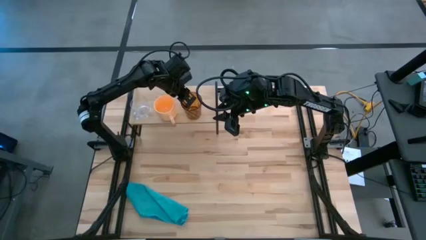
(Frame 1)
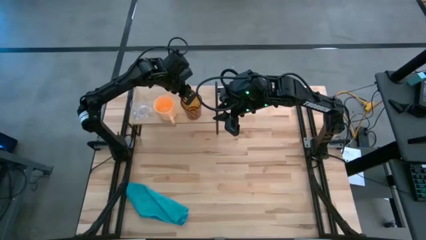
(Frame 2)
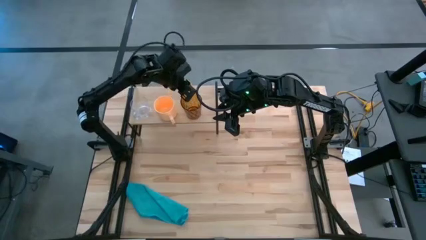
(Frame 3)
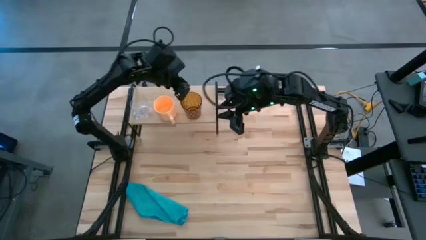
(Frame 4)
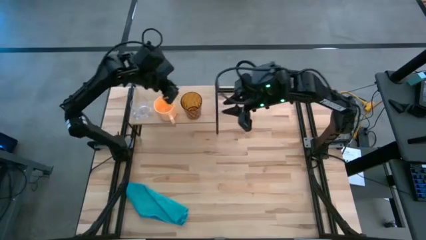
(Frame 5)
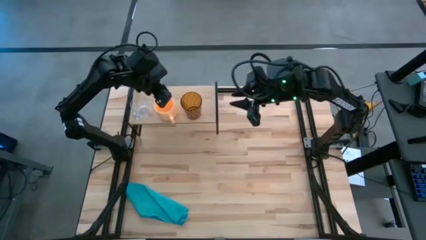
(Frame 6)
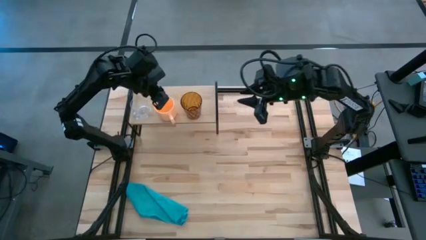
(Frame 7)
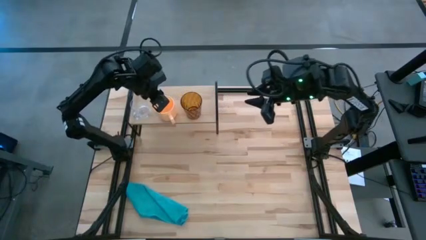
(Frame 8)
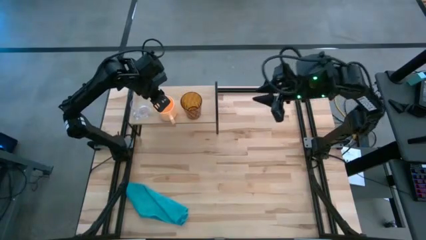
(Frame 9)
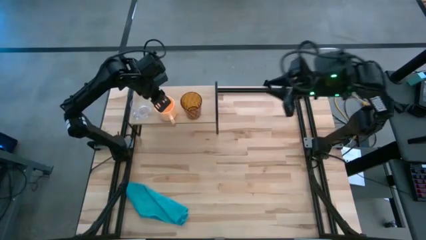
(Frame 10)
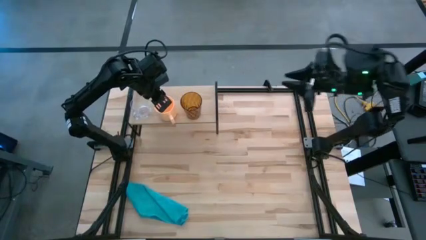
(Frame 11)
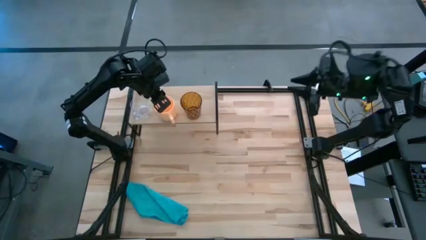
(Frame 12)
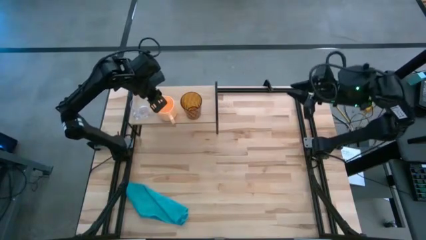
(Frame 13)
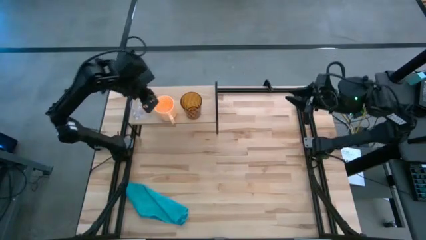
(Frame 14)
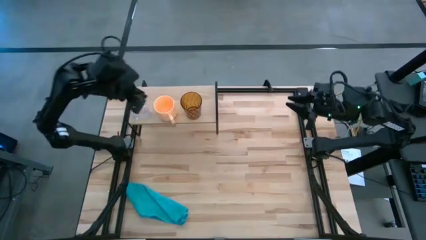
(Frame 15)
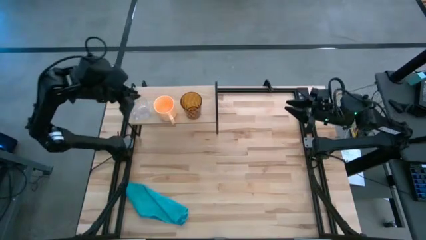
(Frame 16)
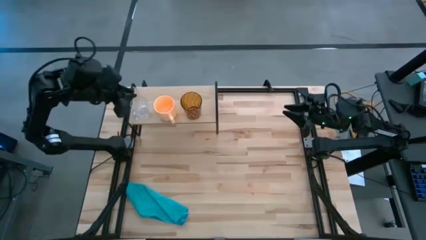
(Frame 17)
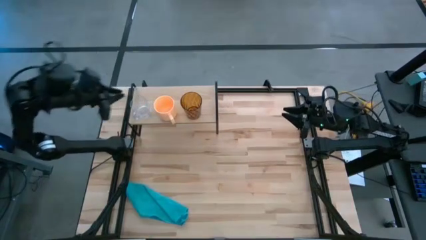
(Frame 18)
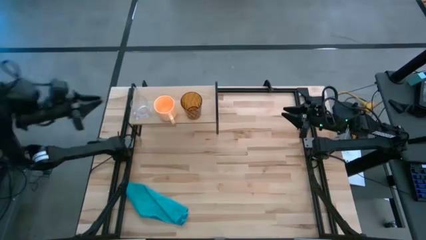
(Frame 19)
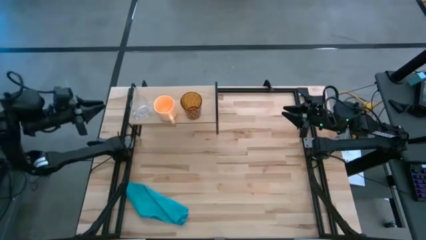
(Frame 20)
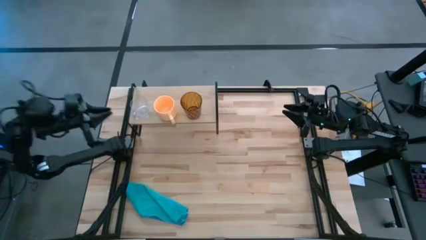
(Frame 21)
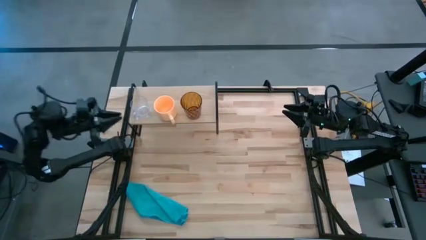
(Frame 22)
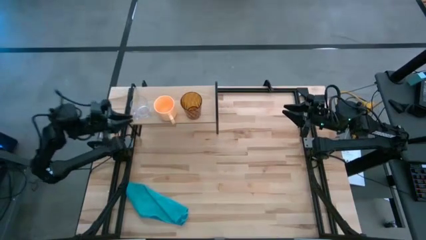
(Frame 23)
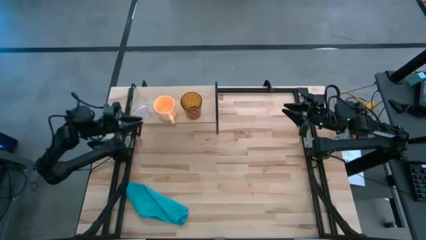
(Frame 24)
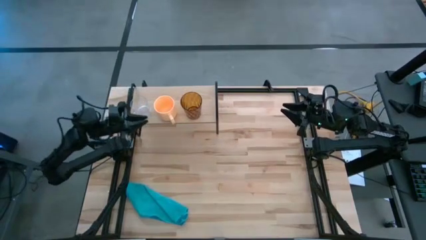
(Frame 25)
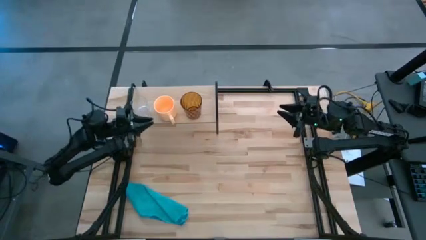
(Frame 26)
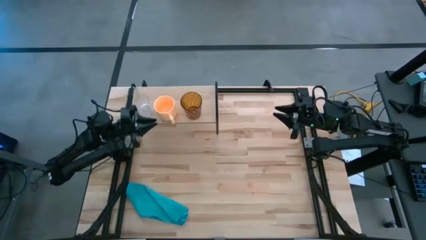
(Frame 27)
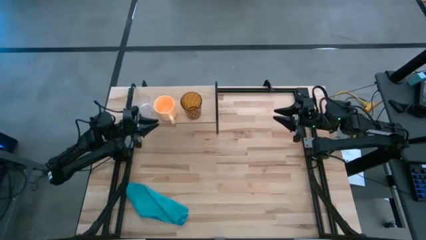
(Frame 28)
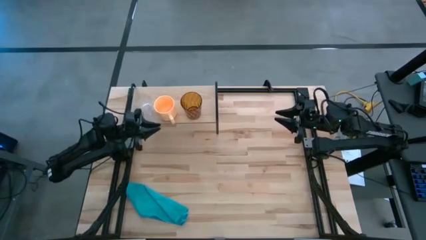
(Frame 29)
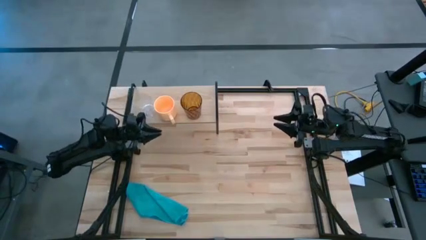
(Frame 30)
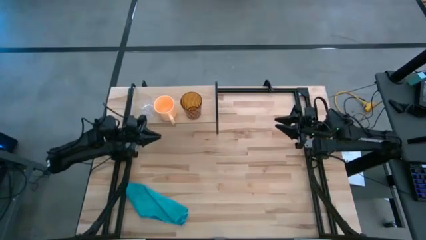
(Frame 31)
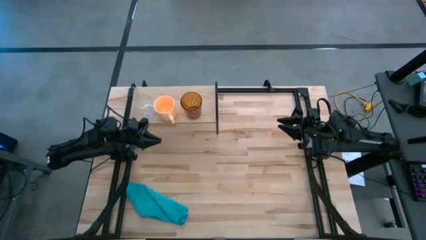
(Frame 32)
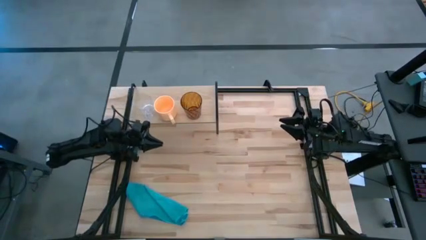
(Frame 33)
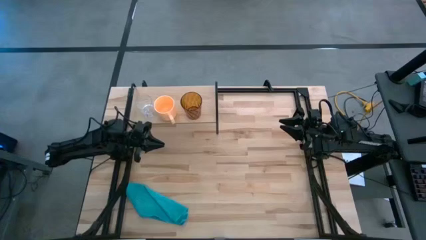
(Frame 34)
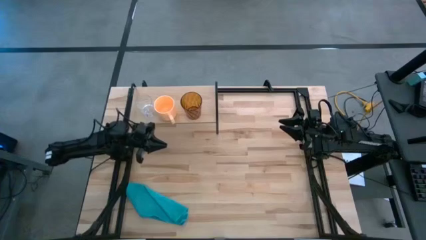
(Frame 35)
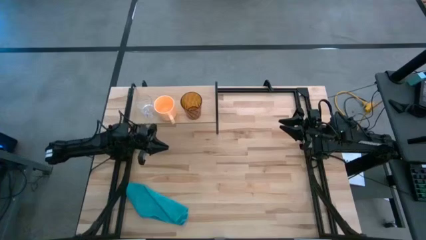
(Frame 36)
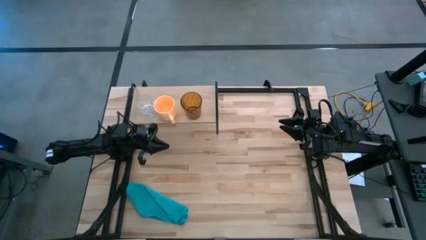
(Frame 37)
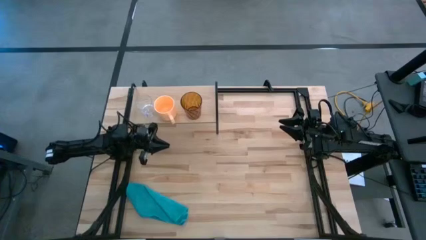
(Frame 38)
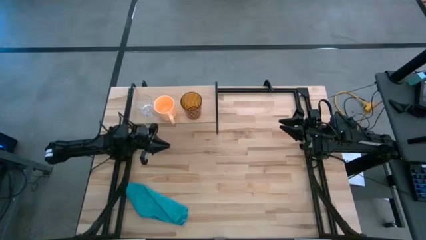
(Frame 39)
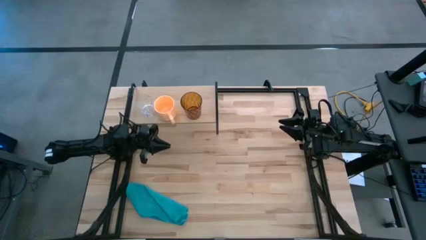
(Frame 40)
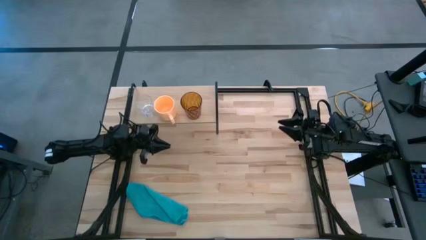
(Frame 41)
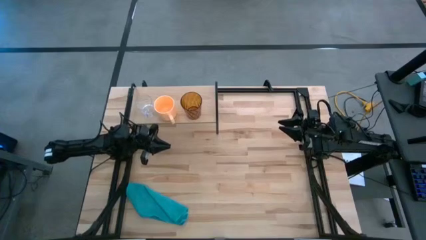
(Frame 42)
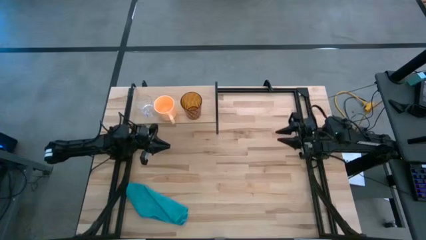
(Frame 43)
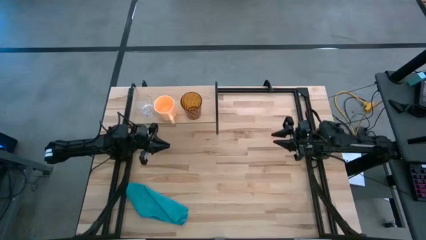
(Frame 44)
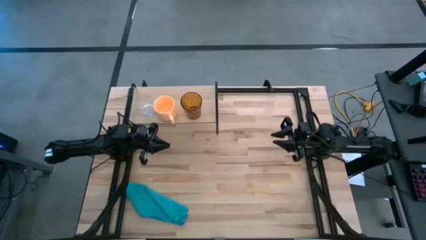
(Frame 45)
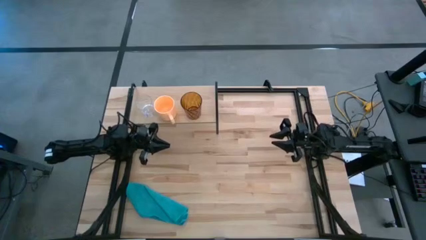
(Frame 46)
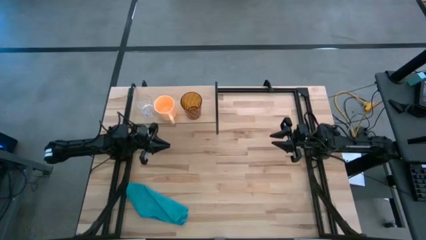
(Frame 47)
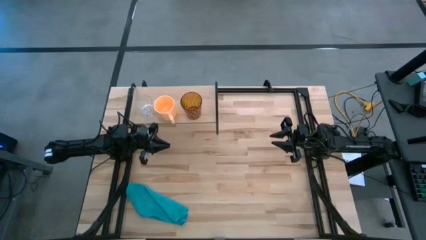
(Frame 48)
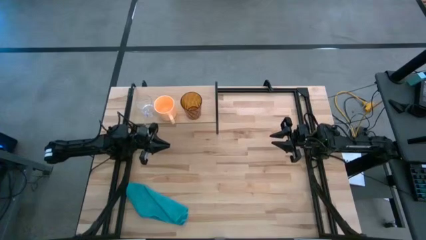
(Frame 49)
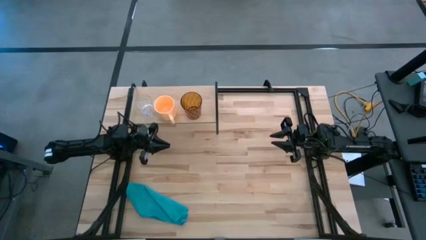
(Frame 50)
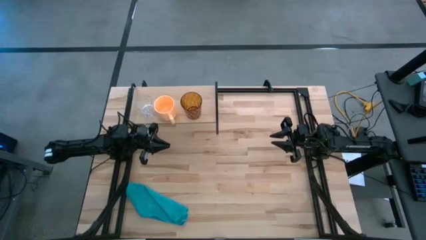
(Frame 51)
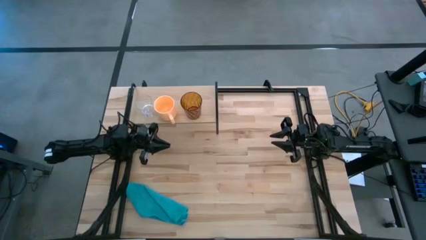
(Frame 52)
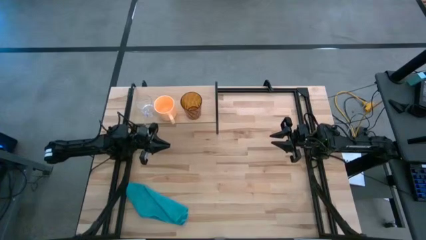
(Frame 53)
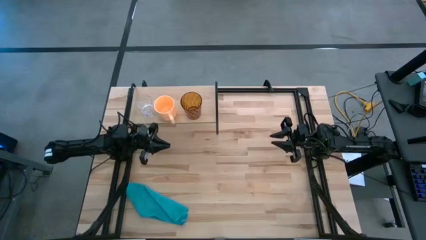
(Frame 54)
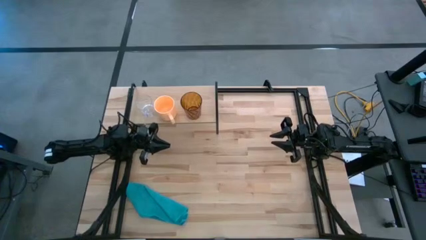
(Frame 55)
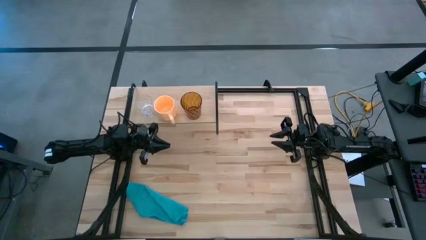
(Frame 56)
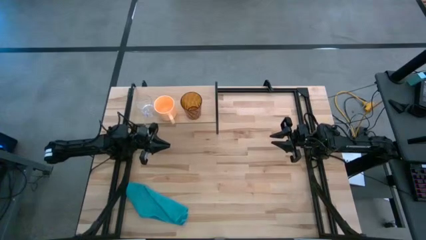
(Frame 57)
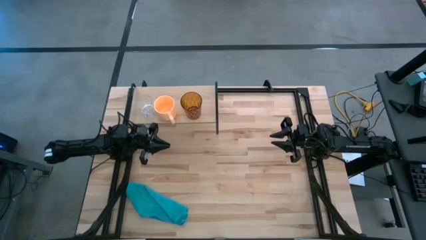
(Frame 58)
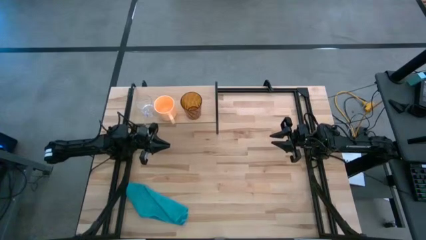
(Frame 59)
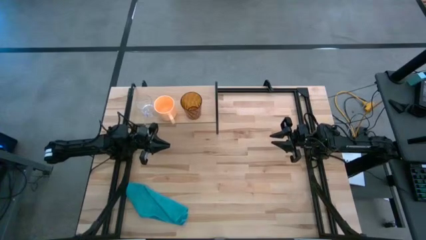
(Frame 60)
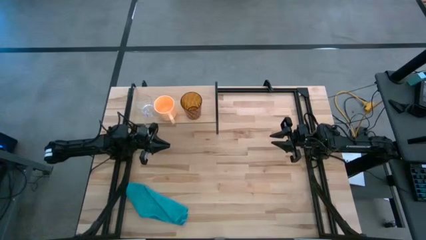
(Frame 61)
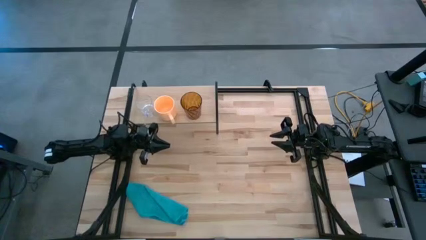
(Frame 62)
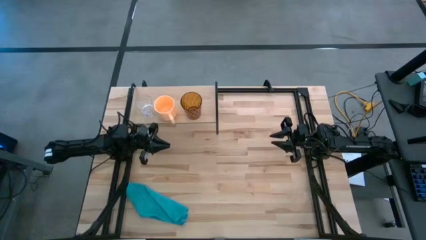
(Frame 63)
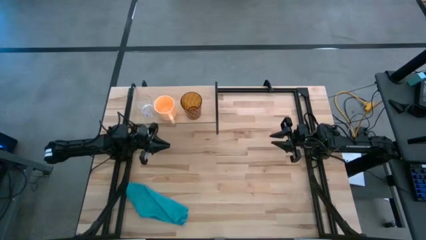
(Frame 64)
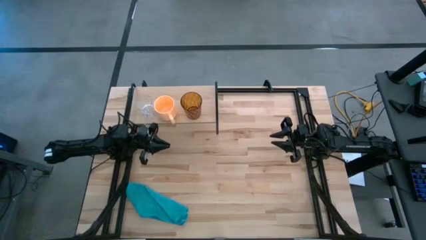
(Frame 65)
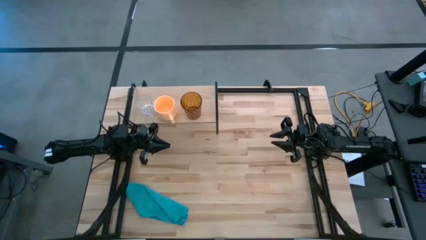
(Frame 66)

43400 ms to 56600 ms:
Task: Stack small to large cups/mugs on shelf
Return to Home Position

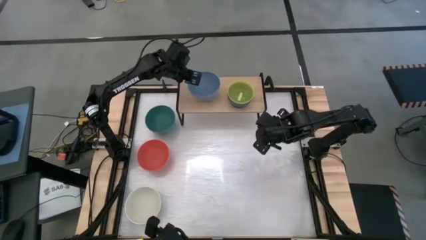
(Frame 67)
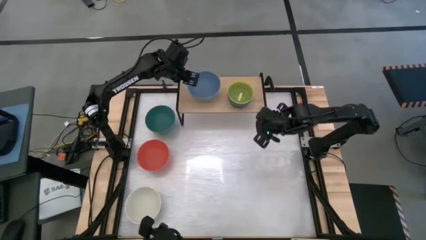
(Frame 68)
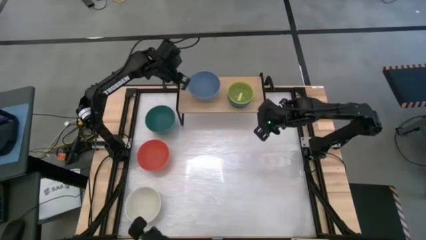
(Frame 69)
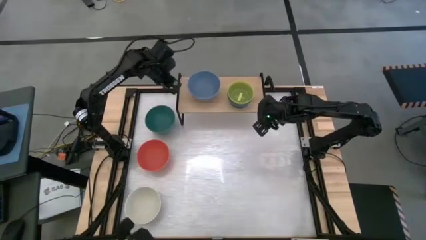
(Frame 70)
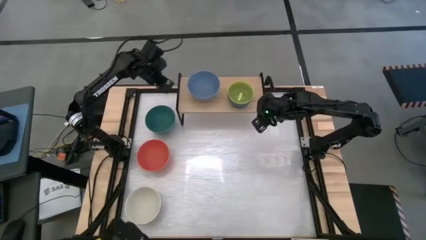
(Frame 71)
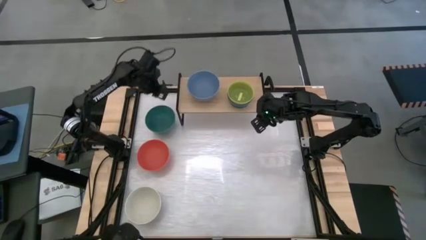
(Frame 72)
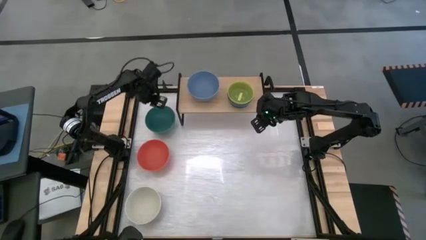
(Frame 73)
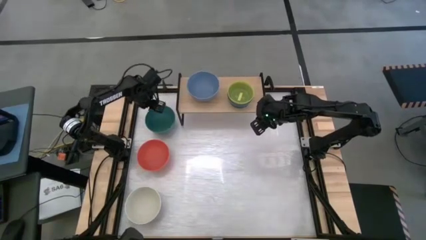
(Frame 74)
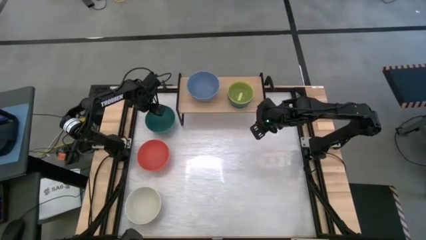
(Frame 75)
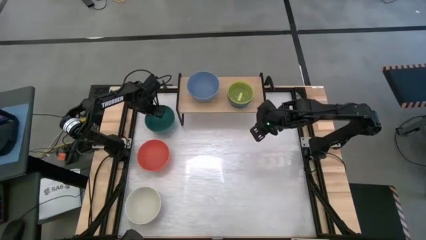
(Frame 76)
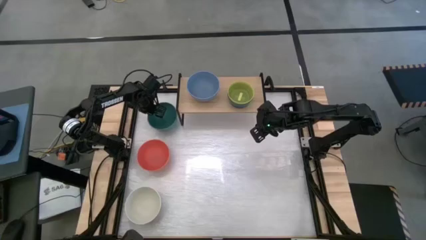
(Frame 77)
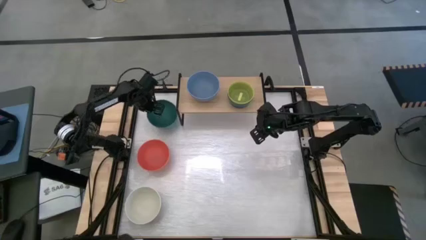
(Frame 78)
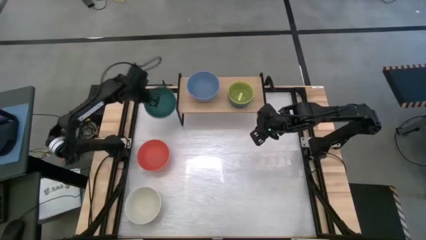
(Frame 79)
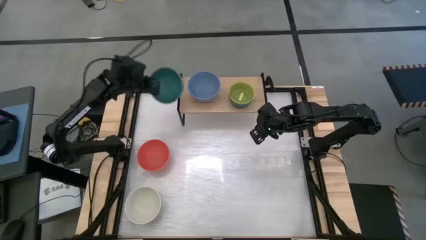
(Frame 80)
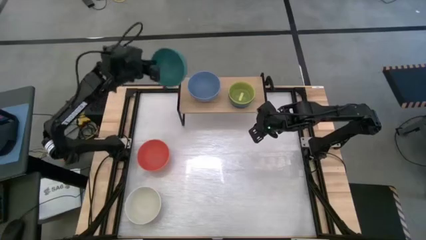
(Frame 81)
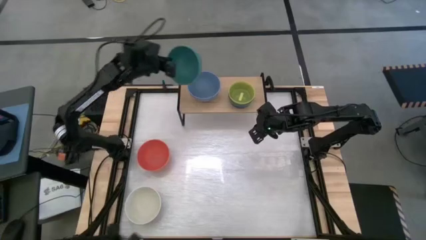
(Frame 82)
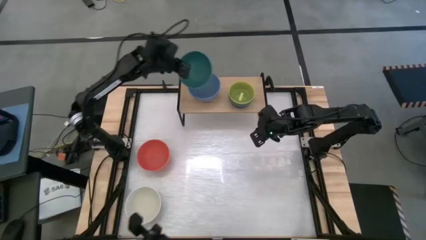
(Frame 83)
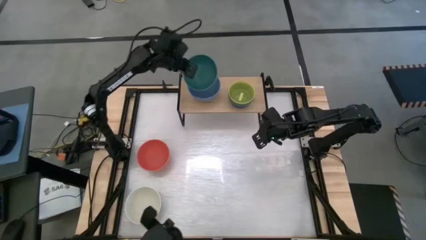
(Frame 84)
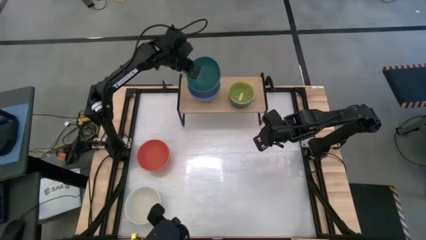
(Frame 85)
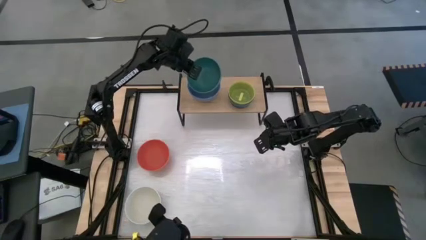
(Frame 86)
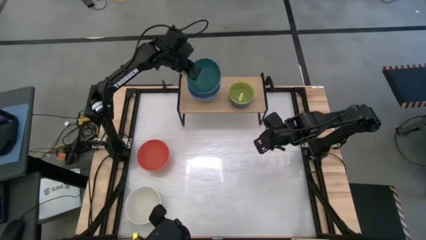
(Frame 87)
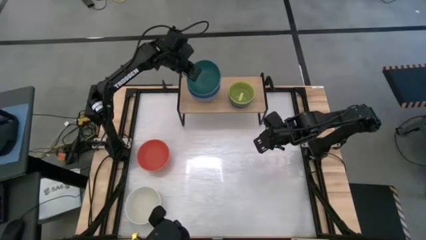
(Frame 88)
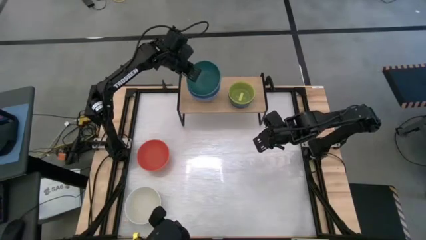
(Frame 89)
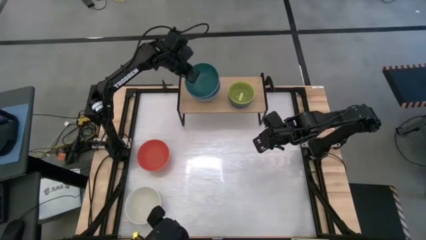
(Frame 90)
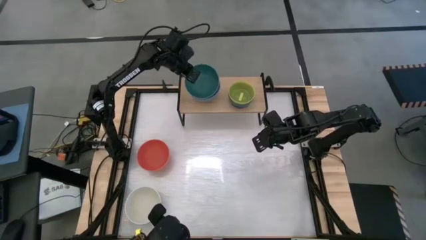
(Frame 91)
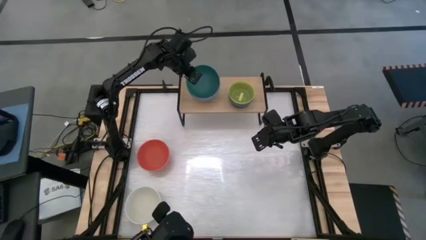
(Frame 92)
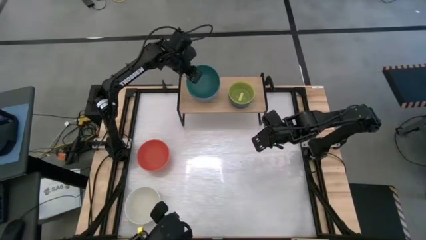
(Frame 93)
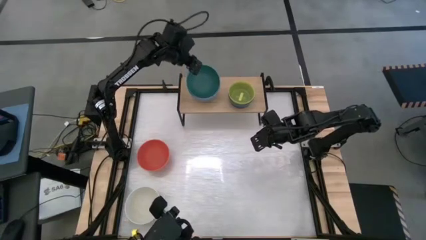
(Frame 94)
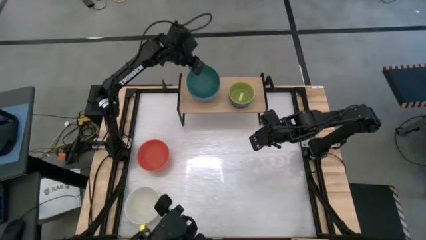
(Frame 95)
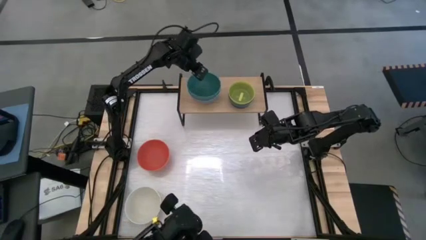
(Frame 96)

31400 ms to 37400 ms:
Task: Place and stack bowls onto a shelf
Stack the green bowl on top of the blue bowl on the shelf
